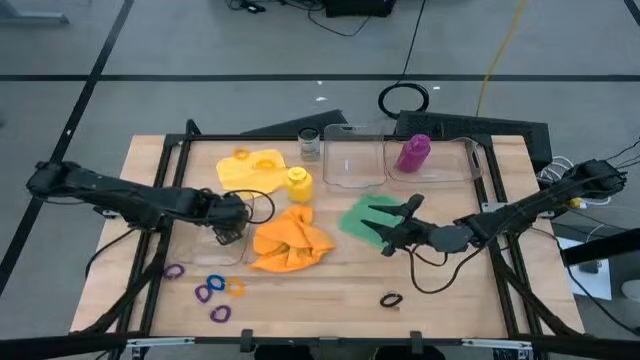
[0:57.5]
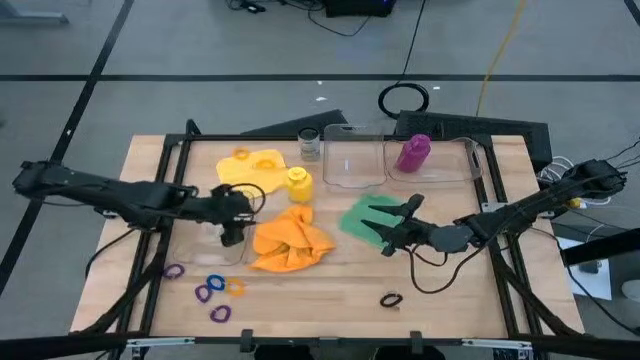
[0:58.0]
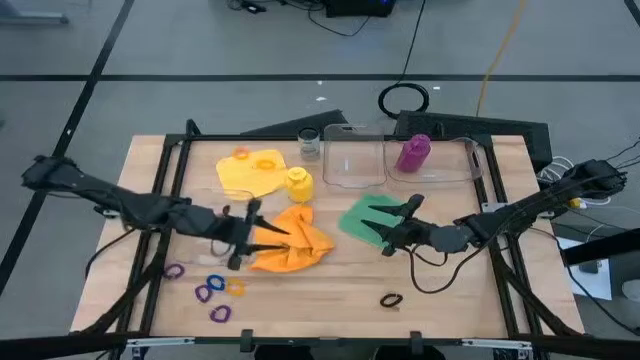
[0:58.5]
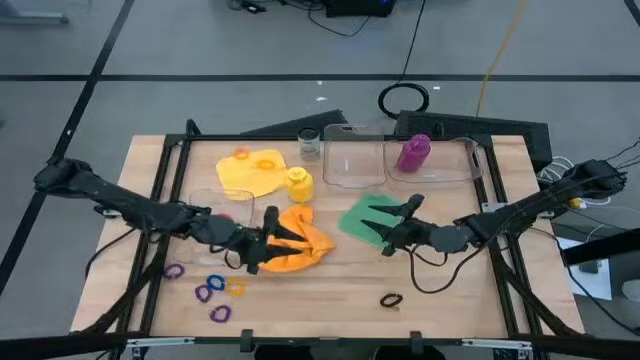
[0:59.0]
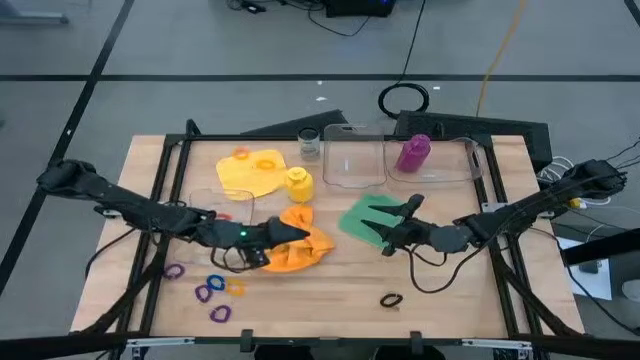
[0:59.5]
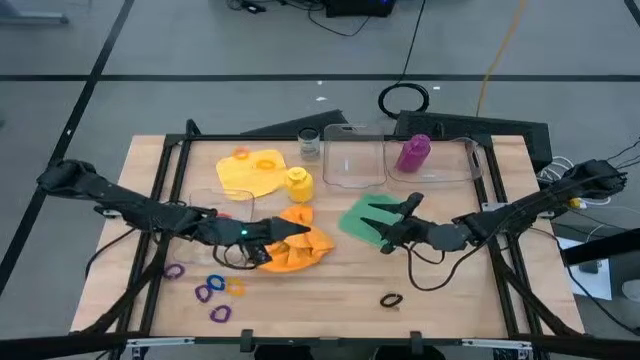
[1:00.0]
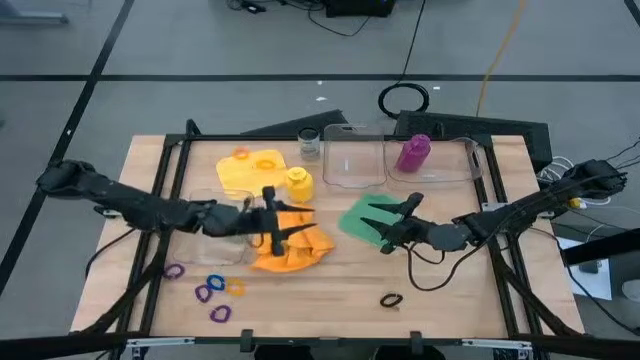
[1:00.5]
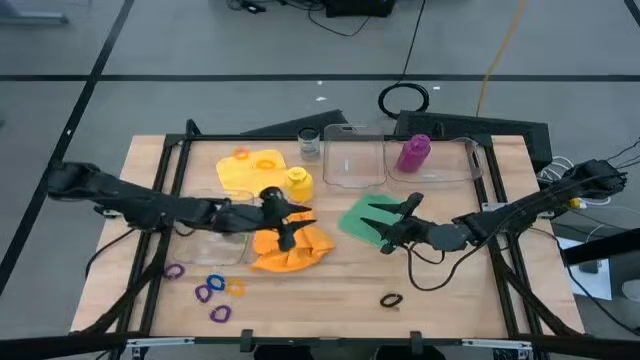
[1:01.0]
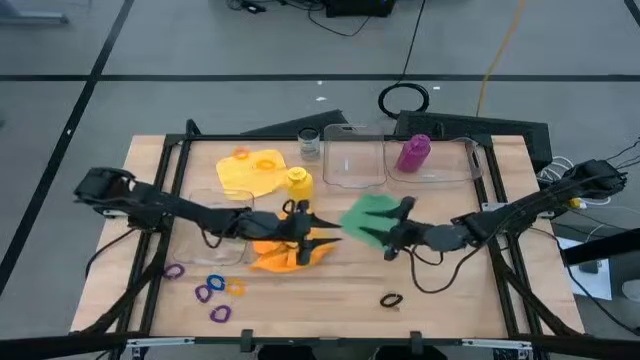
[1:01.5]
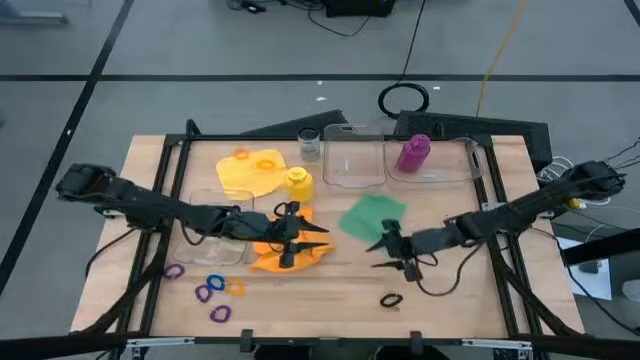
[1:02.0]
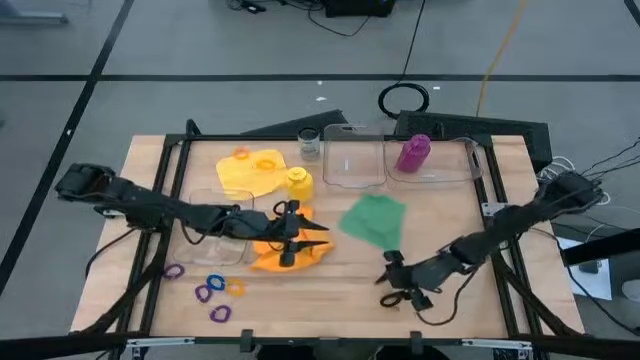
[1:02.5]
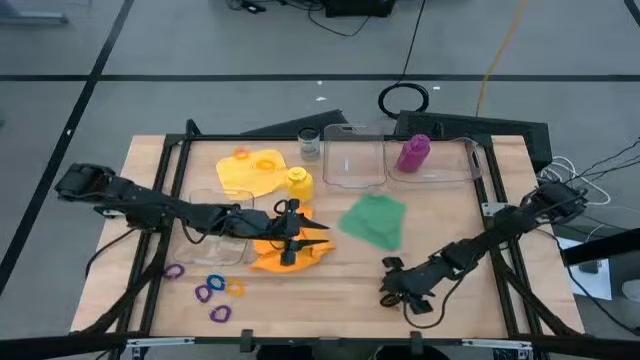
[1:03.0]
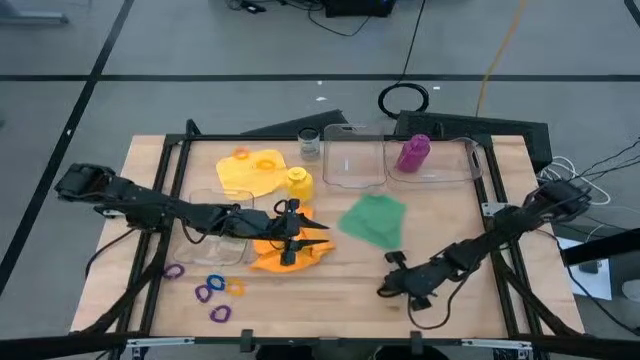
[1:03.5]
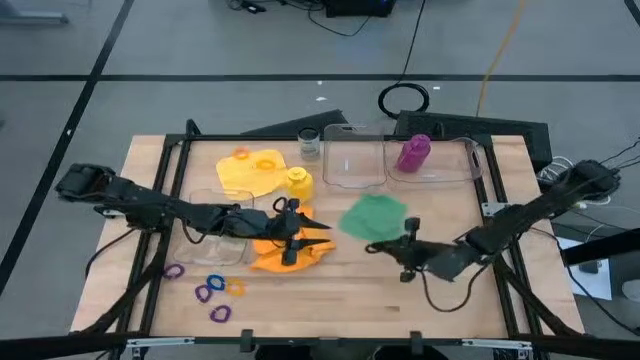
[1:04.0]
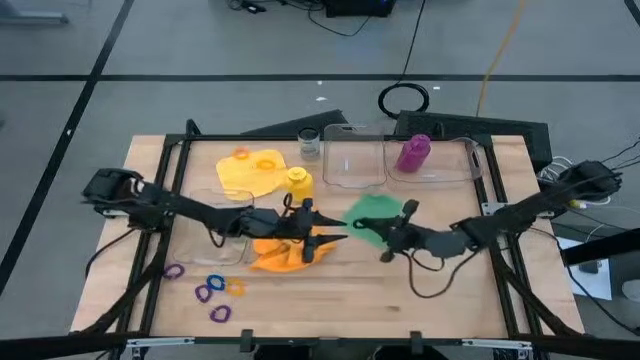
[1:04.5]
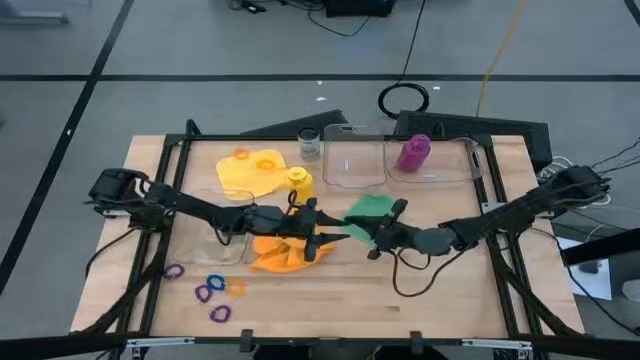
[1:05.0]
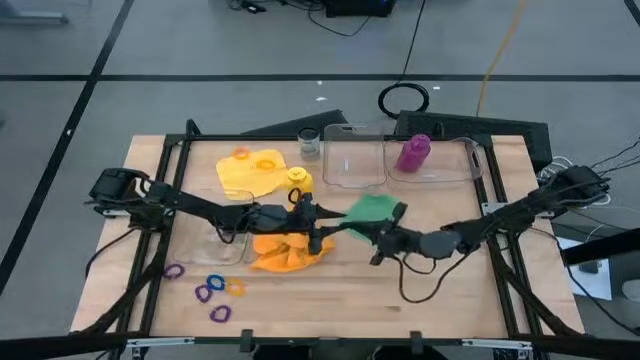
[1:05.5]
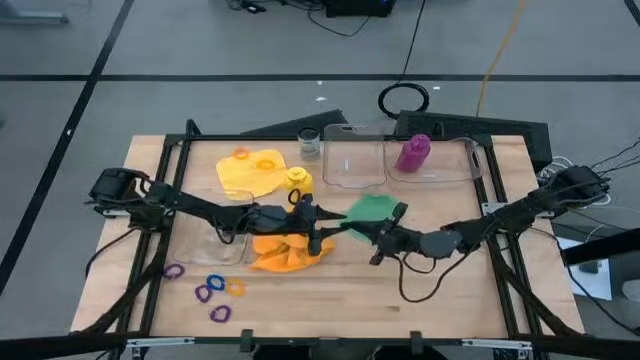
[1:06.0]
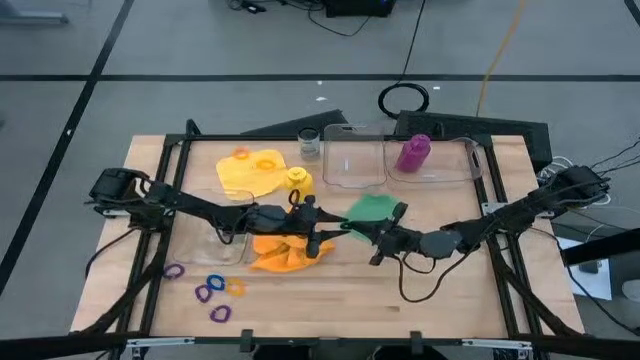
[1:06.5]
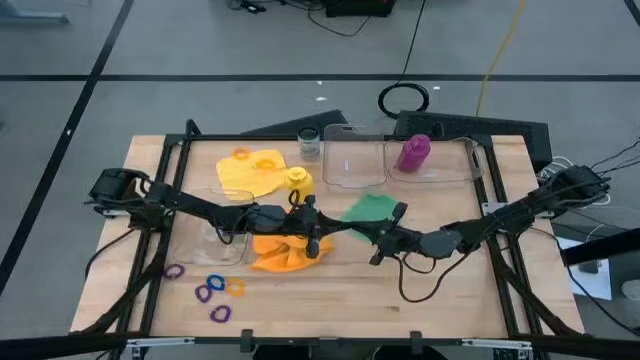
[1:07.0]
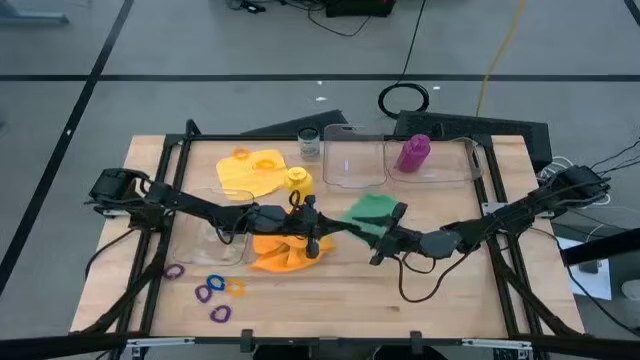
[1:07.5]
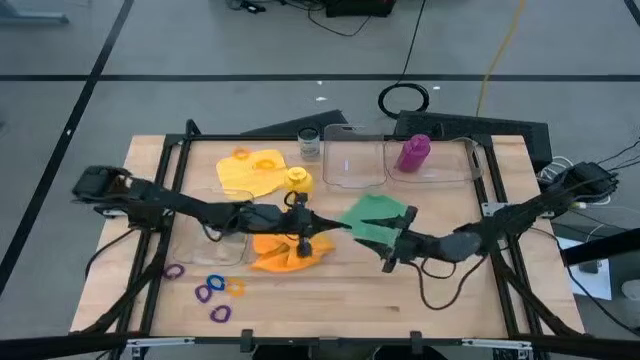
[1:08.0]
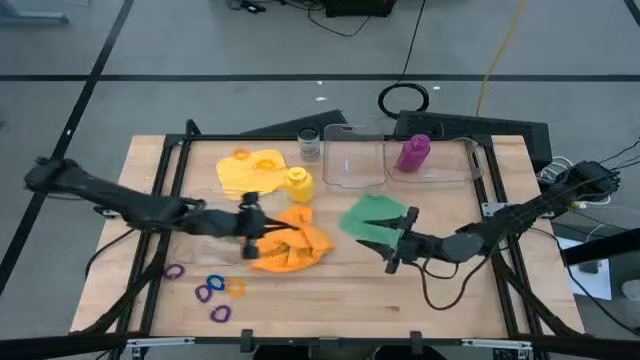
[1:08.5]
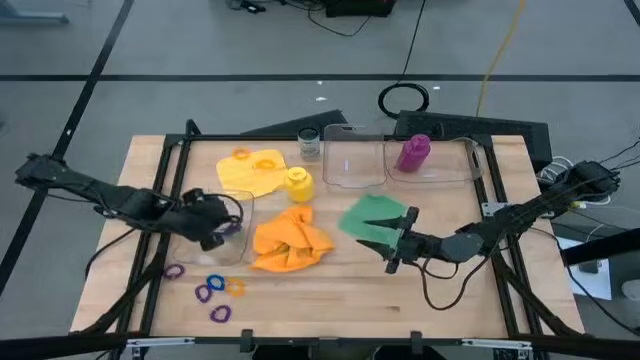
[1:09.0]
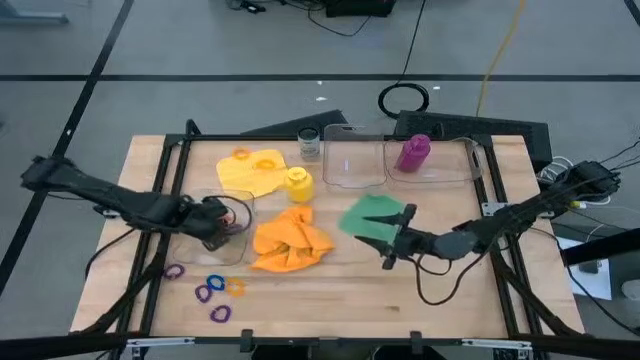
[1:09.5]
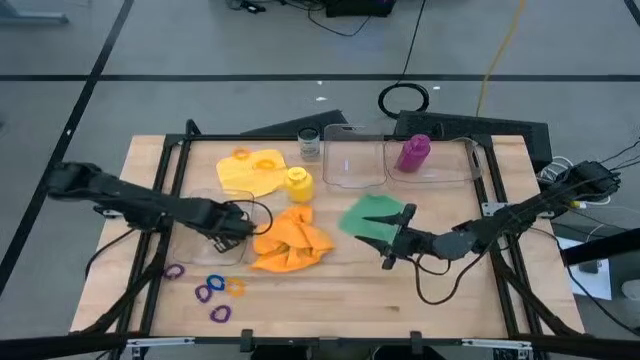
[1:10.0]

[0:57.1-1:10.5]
Task: Pick & Place Sports Items
Put the black spring keychain into the bottom transparent bin
